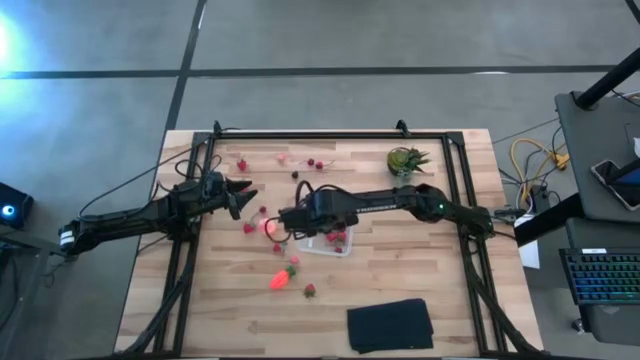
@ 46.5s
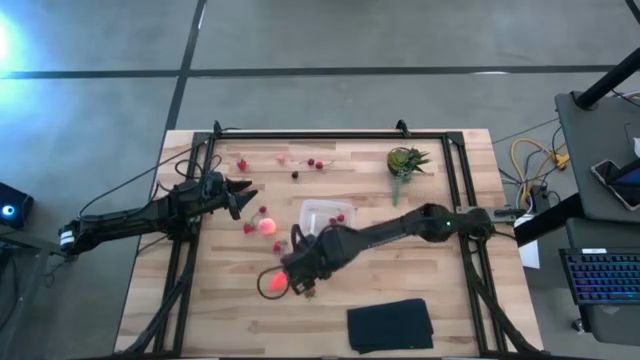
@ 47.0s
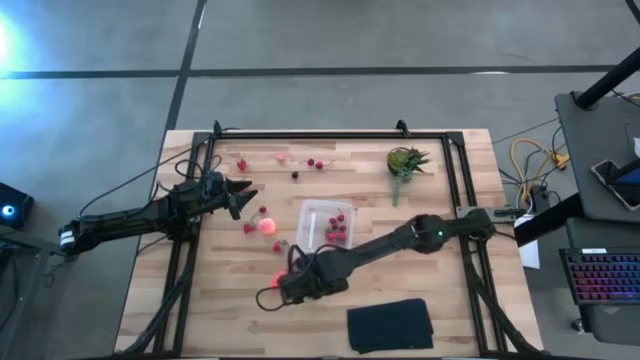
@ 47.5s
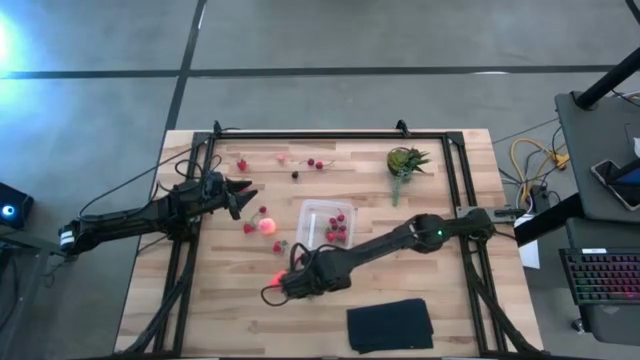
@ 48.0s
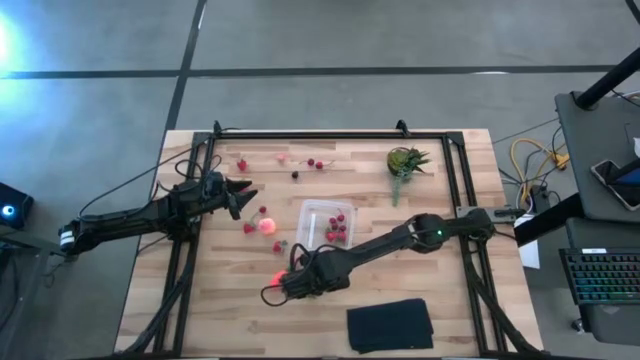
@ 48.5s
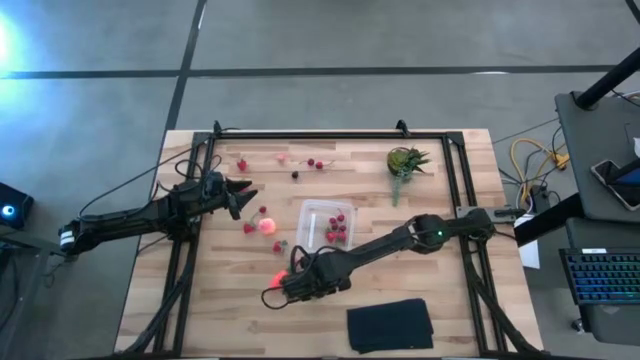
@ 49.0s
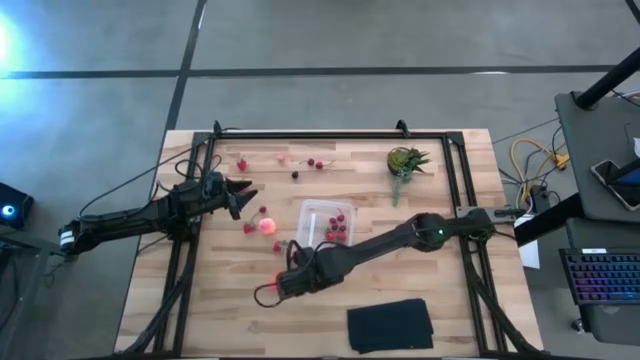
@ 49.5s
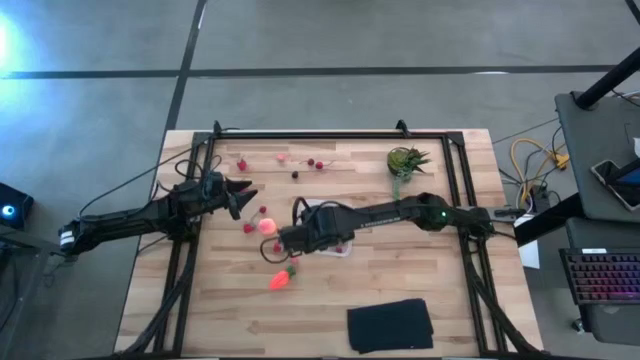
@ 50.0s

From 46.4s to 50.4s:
Task: Pick and placing Produce into tupperware
Put the red strawberry into the transparent bin

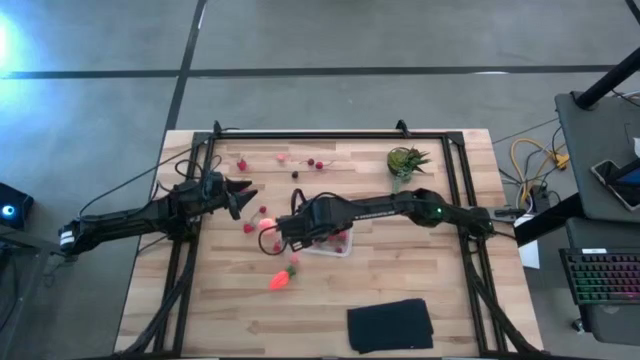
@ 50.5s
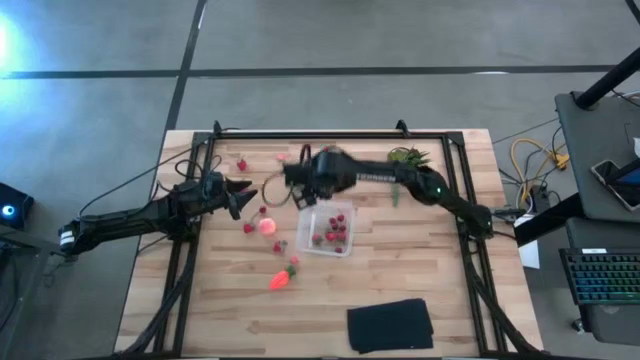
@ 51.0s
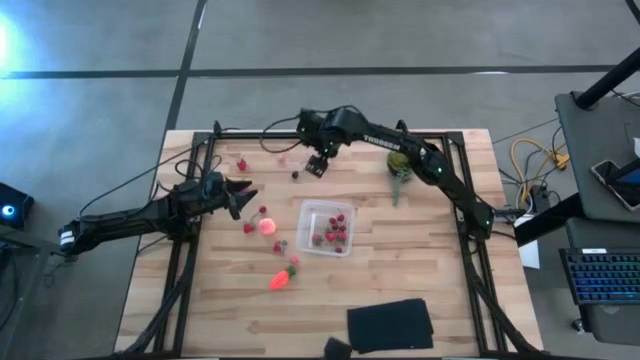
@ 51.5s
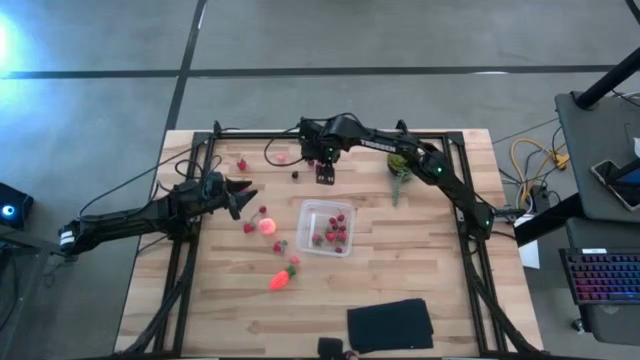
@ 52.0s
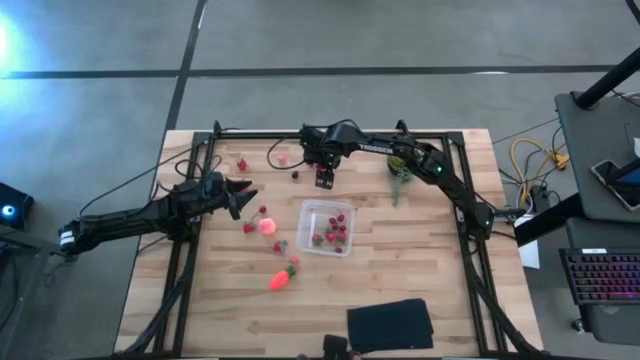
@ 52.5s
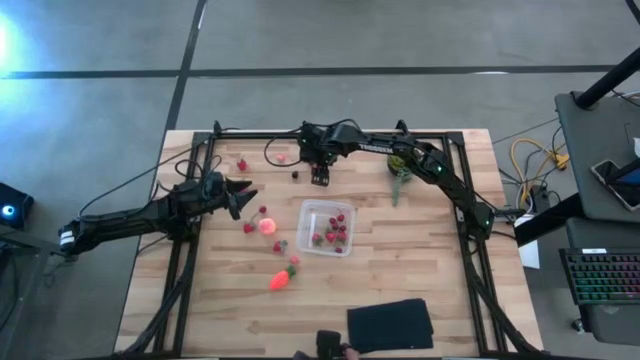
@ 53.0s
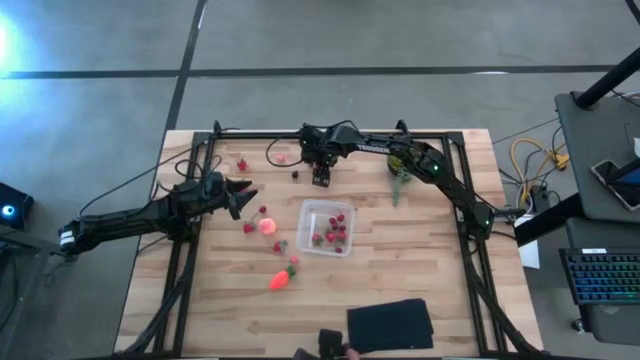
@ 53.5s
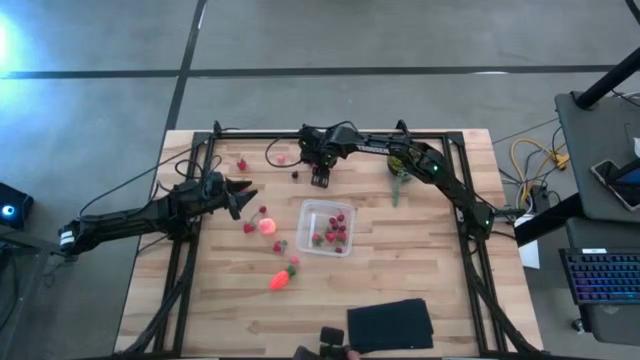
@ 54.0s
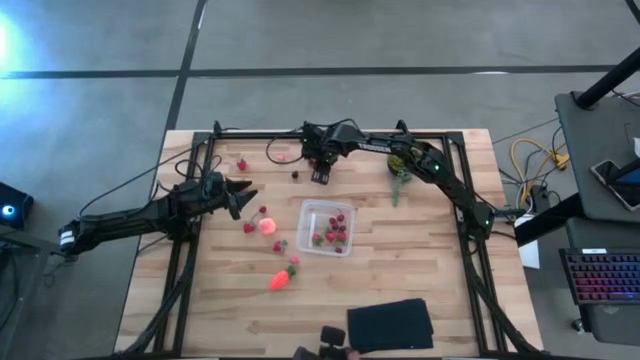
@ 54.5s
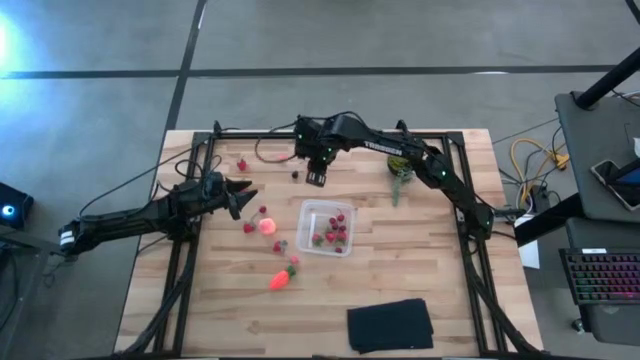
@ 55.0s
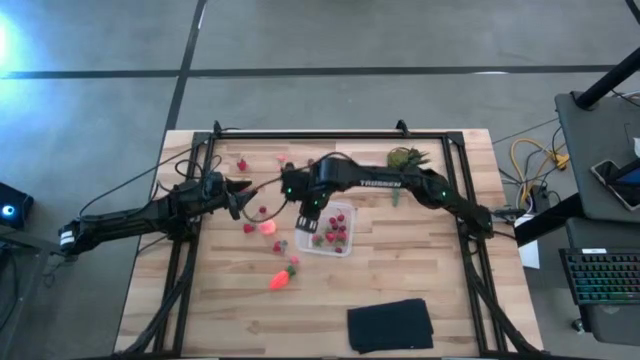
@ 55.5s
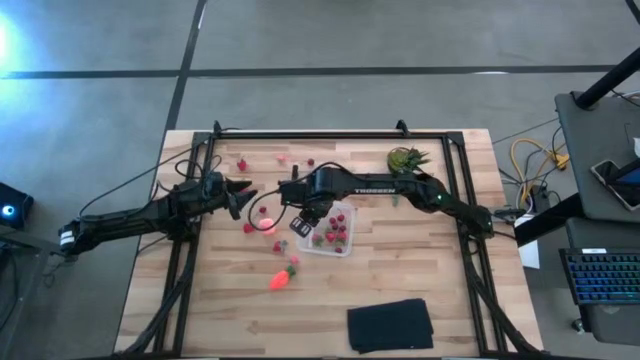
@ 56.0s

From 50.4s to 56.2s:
Put the red cherry into the transparent bin

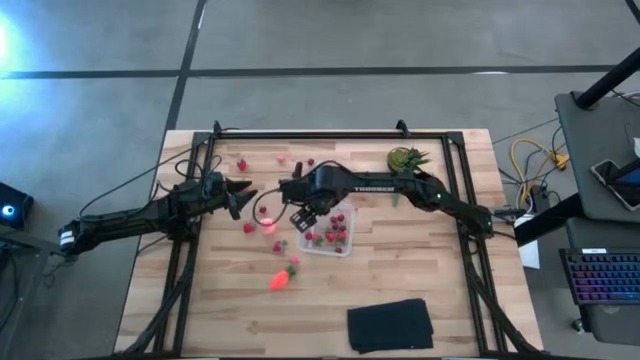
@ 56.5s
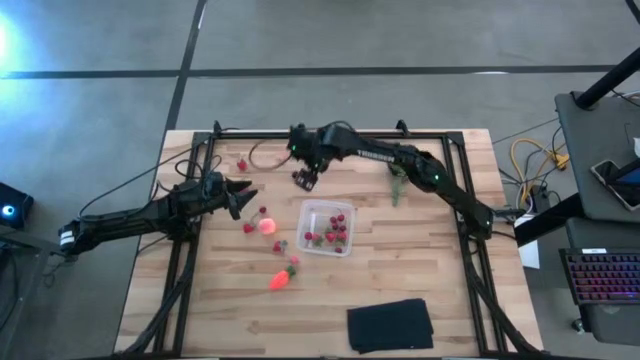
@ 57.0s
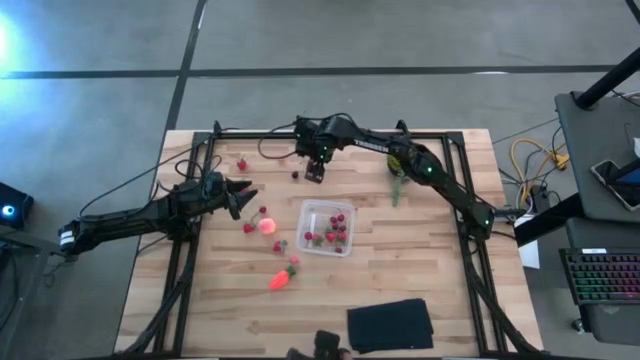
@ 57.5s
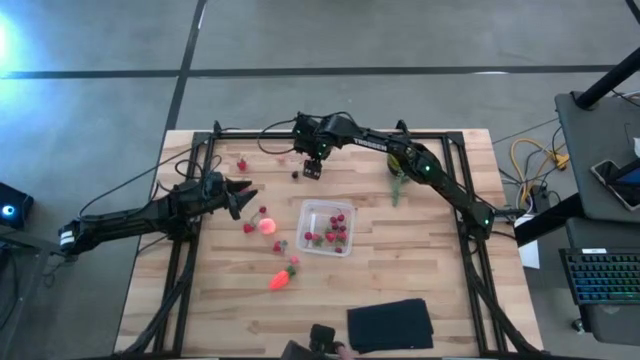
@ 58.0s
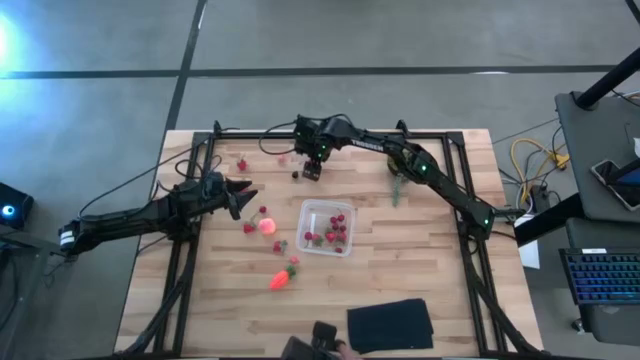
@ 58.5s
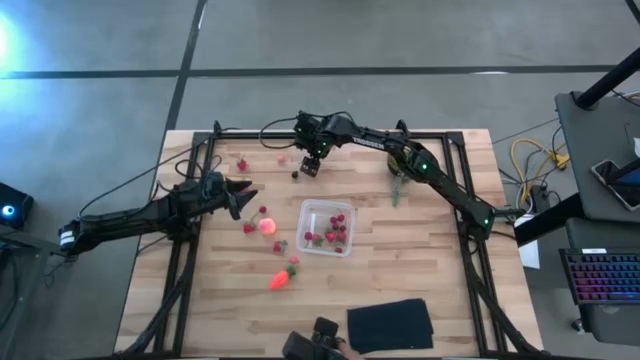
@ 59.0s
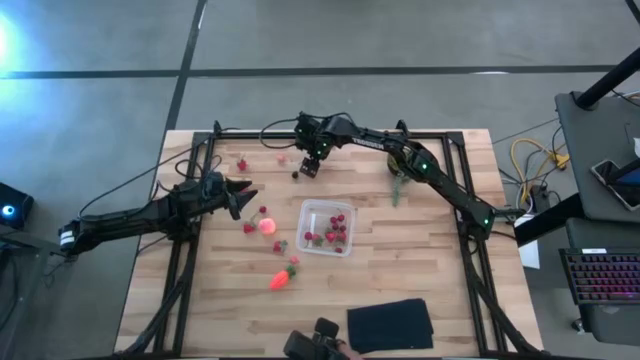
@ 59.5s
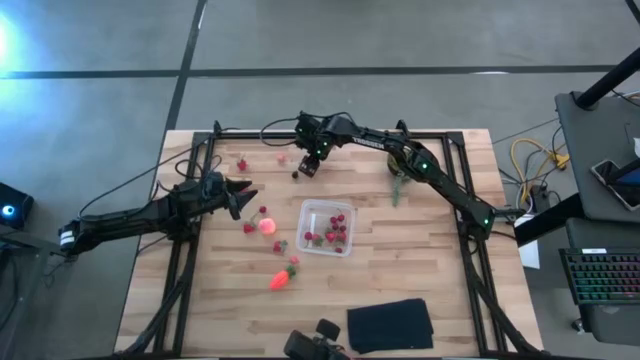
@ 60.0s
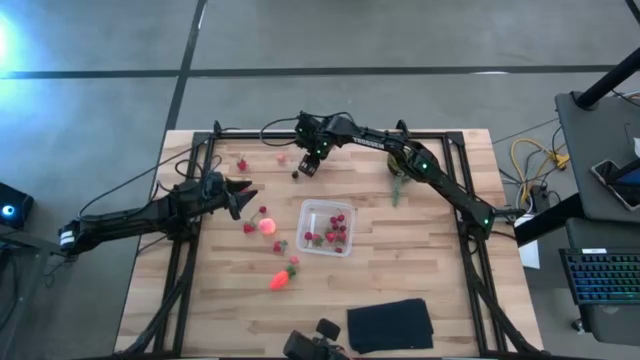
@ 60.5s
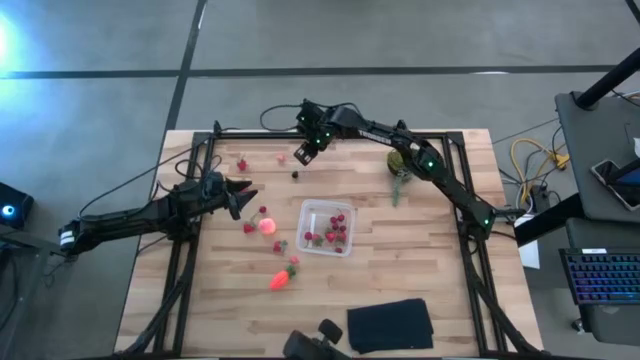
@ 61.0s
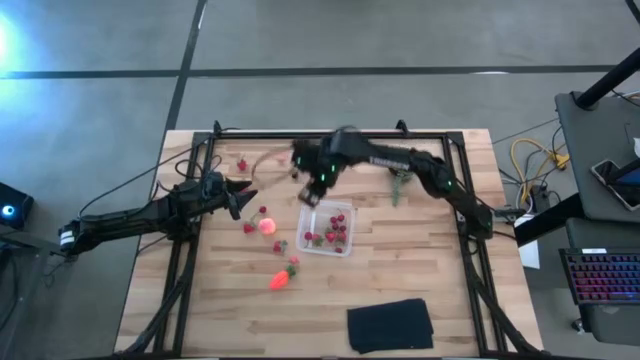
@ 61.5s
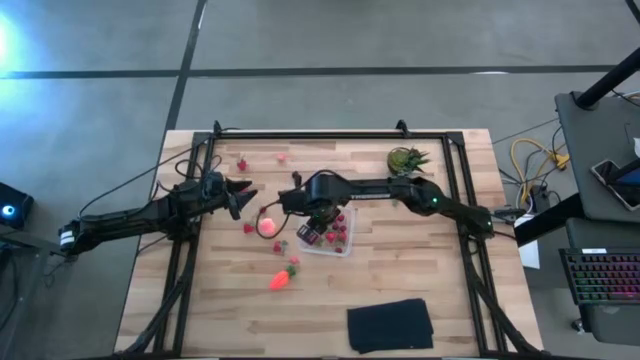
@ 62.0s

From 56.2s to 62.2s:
Put the red cherry into the transparent bin

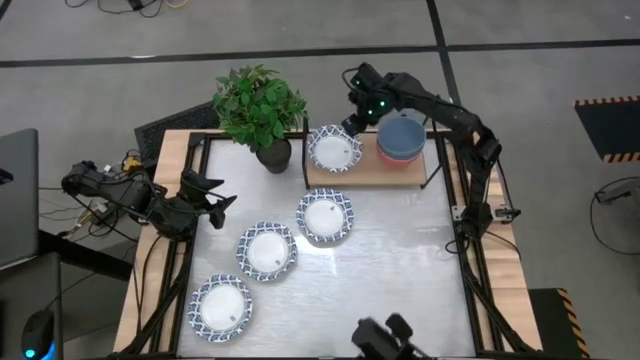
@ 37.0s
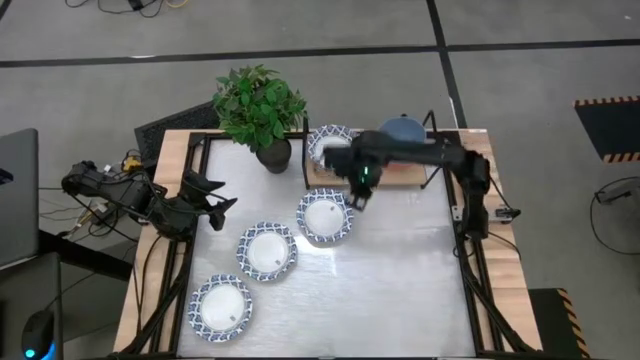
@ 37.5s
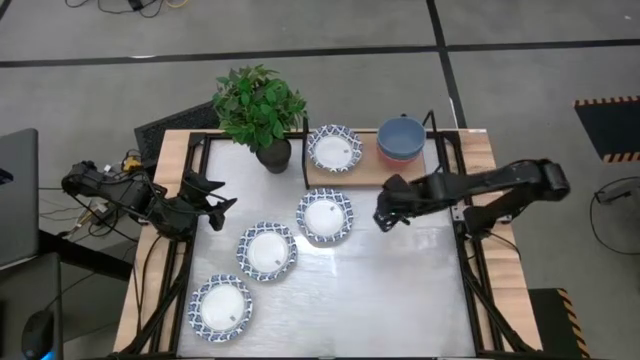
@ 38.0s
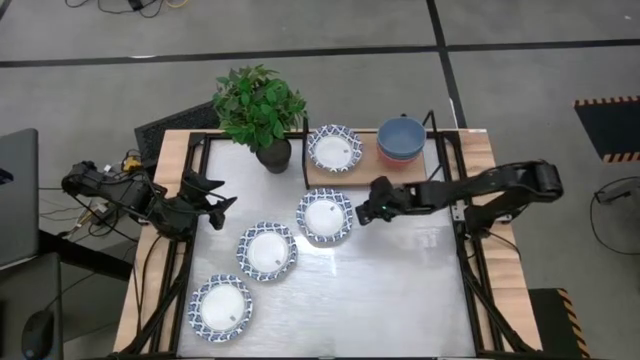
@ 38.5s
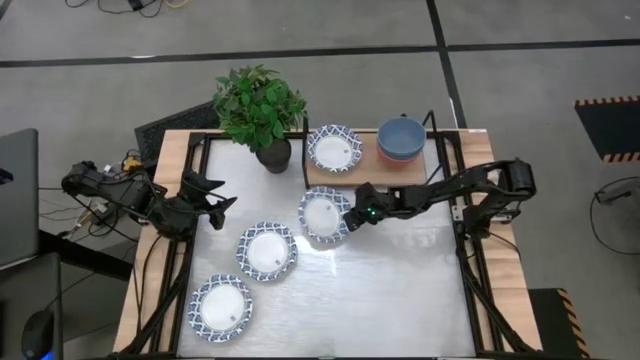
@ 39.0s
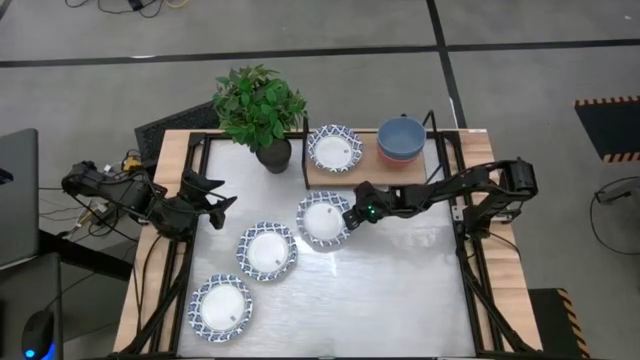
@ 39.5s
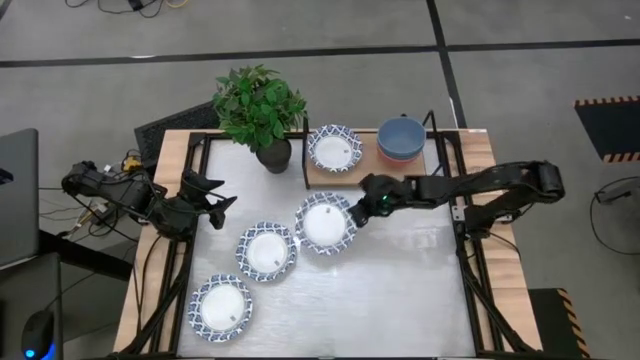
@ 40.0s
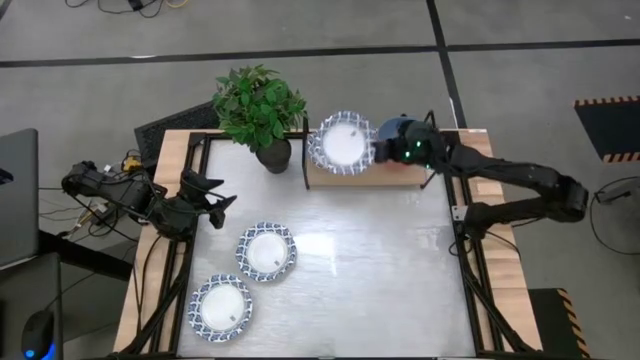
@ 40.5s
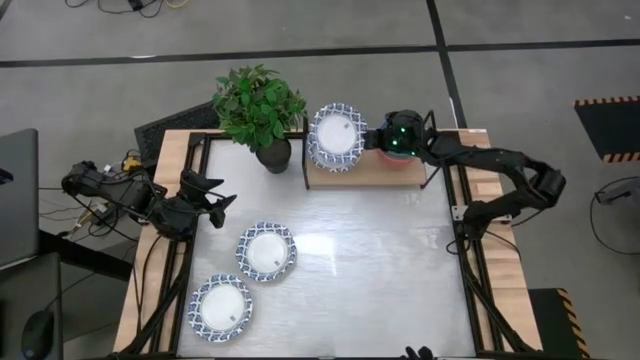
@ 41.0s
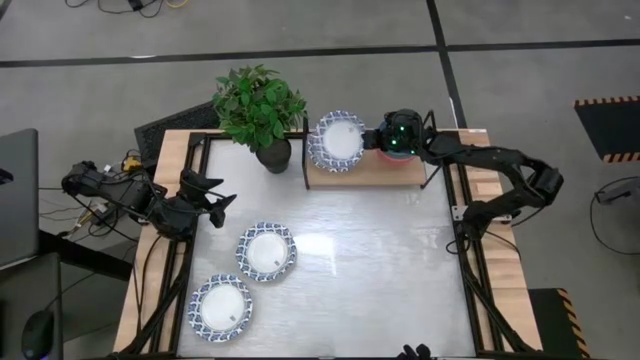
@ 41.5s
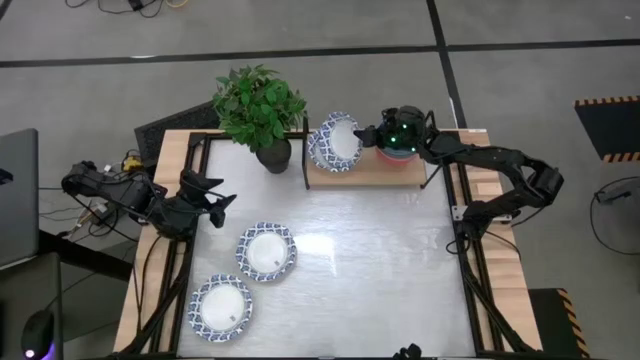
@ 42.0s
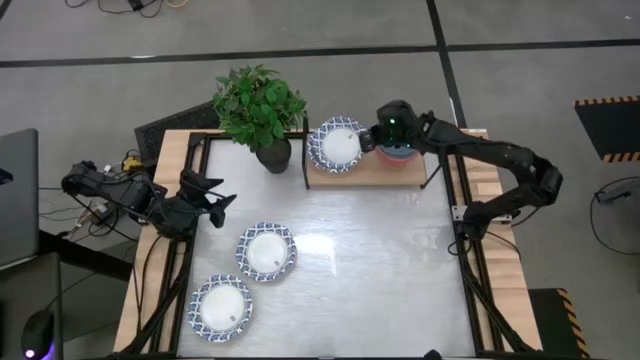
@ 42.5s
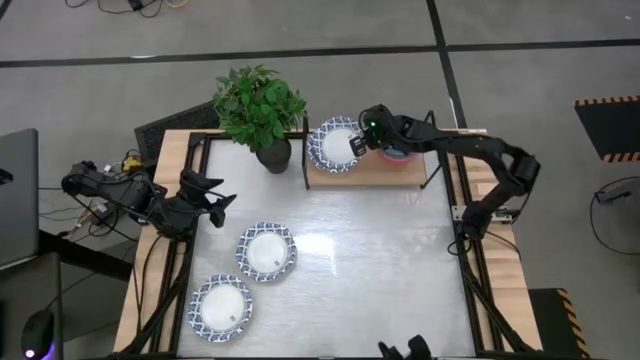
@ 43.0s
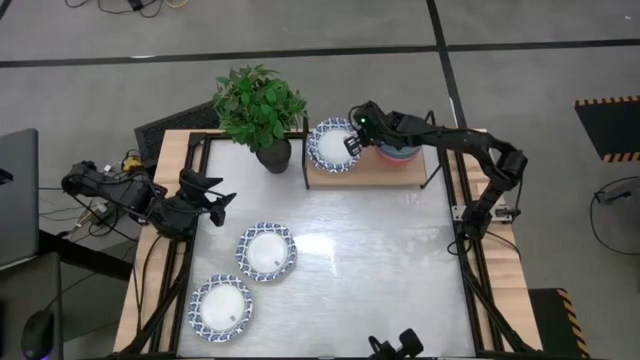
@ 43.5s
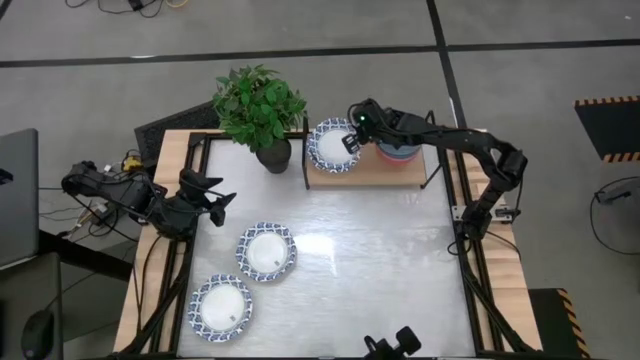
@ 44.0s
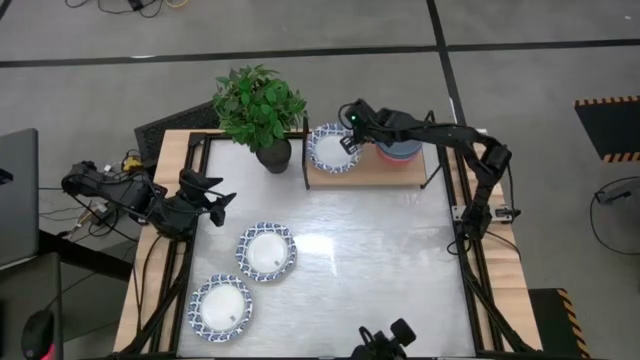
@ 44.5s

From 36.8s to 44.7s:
Task: Place and stack bowls onto a shelf
Stack the white bowl on top of the white bowl on the shelf
